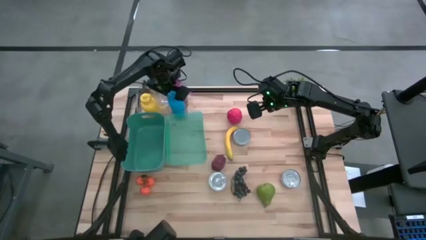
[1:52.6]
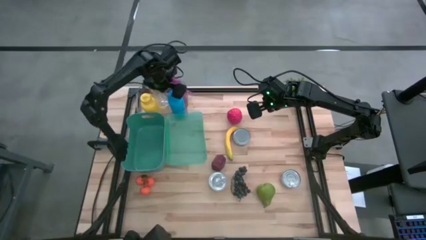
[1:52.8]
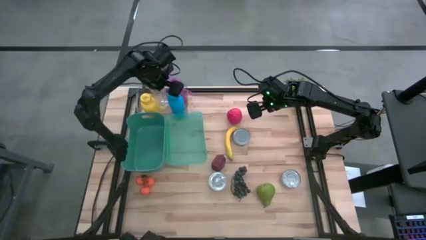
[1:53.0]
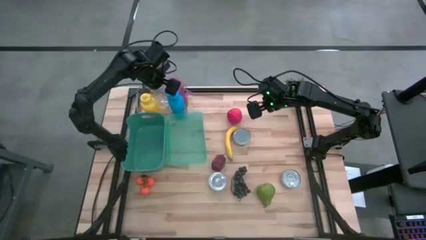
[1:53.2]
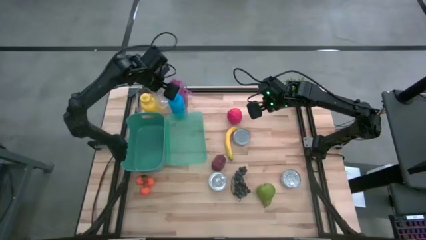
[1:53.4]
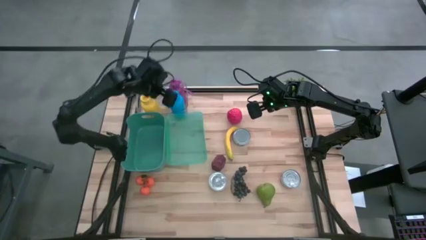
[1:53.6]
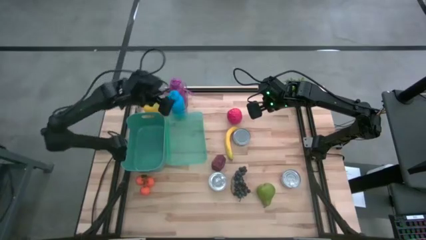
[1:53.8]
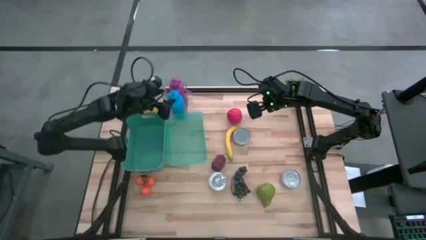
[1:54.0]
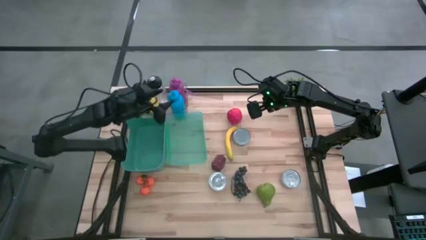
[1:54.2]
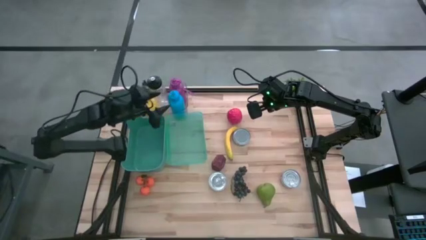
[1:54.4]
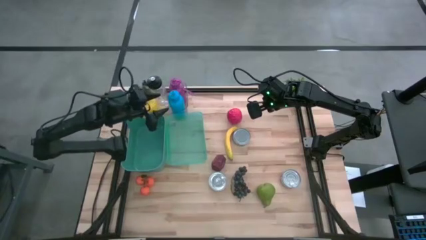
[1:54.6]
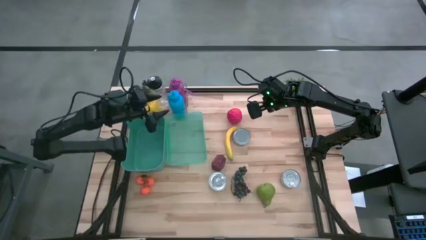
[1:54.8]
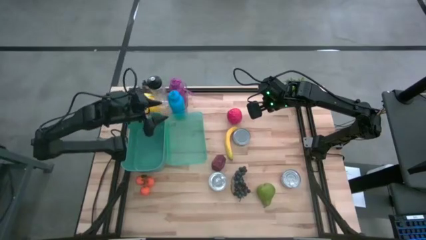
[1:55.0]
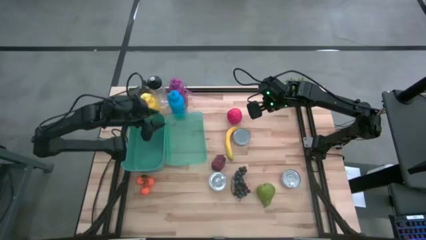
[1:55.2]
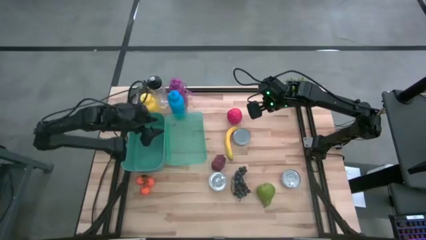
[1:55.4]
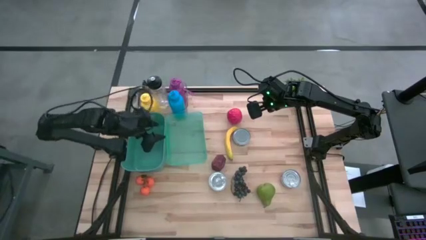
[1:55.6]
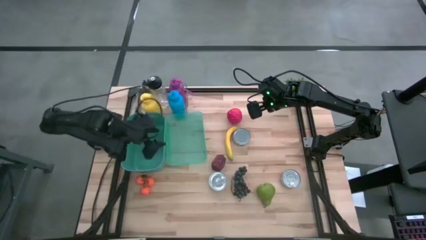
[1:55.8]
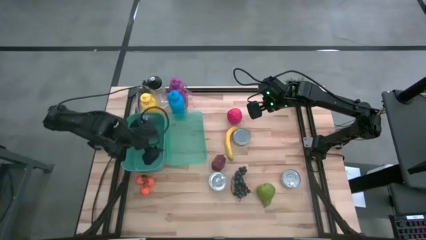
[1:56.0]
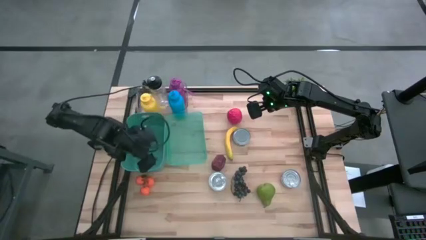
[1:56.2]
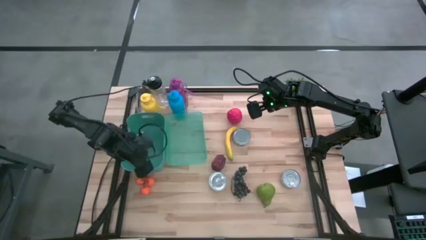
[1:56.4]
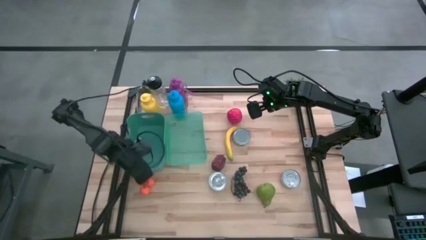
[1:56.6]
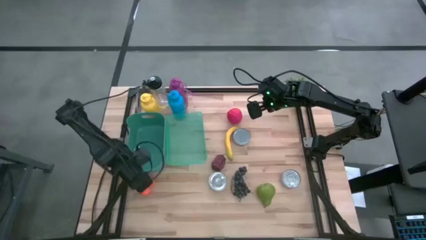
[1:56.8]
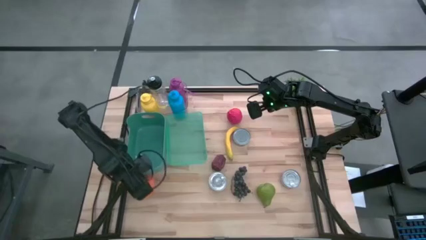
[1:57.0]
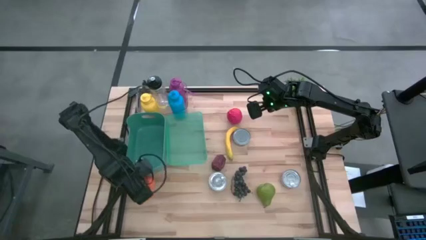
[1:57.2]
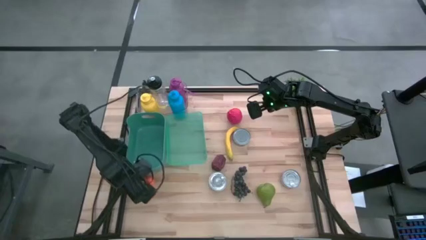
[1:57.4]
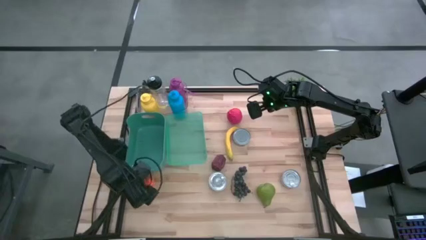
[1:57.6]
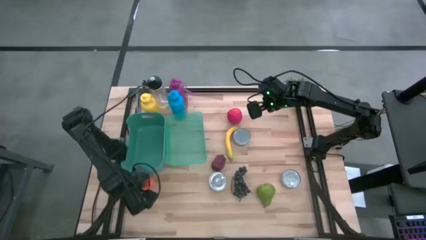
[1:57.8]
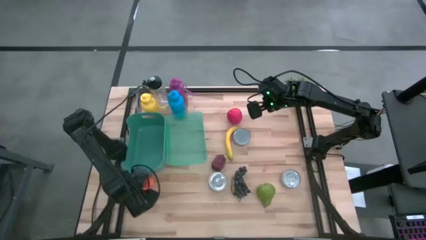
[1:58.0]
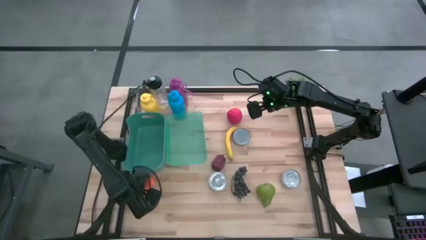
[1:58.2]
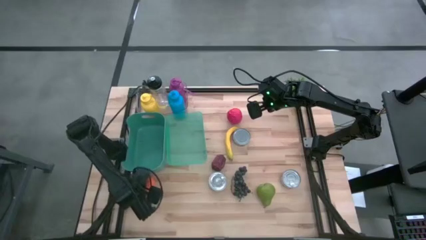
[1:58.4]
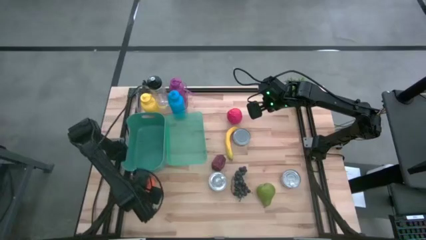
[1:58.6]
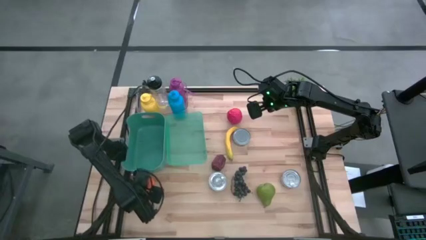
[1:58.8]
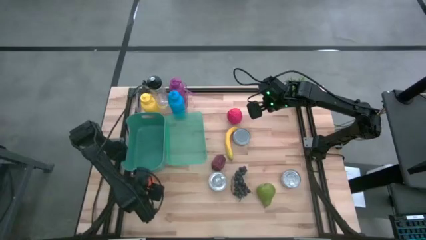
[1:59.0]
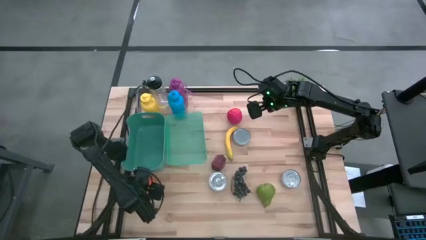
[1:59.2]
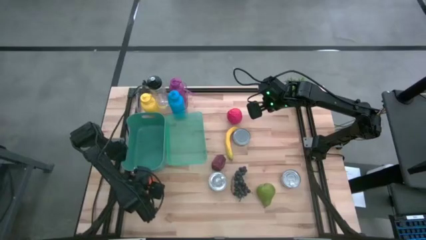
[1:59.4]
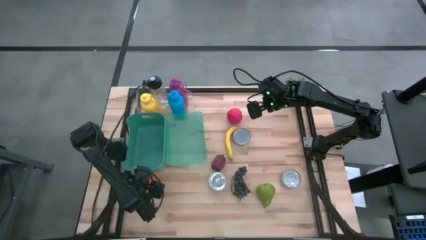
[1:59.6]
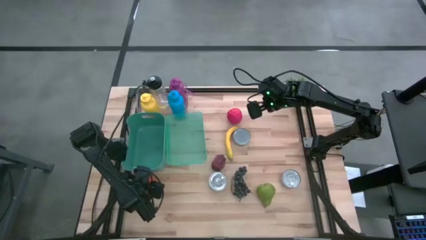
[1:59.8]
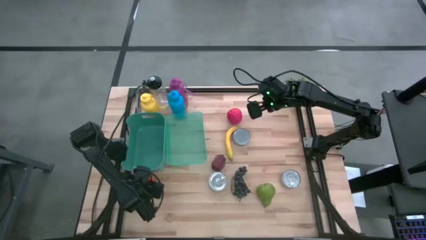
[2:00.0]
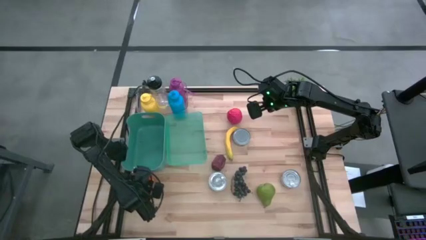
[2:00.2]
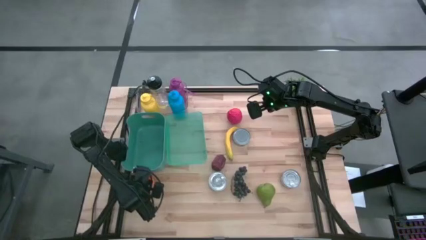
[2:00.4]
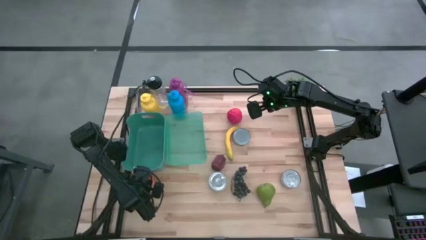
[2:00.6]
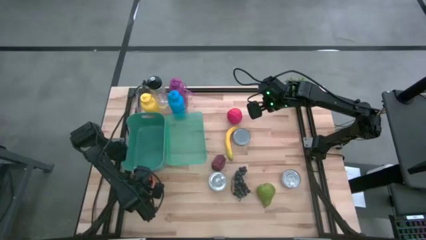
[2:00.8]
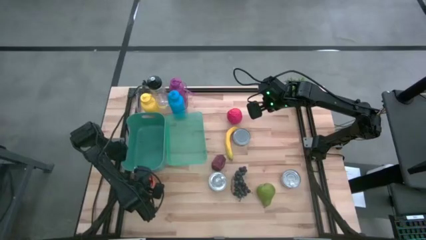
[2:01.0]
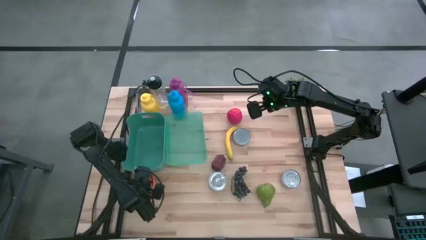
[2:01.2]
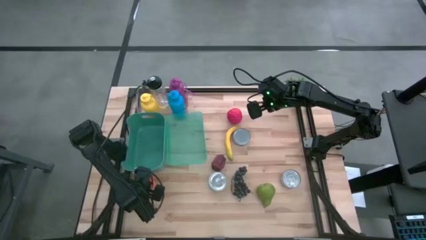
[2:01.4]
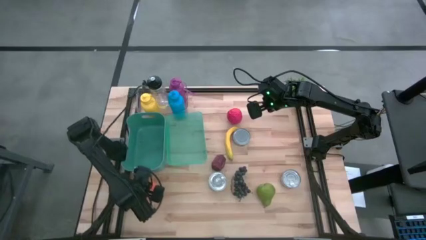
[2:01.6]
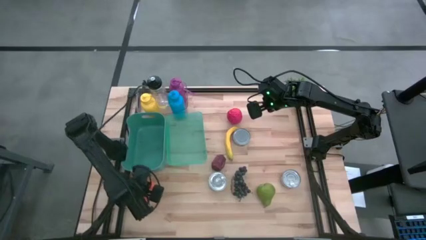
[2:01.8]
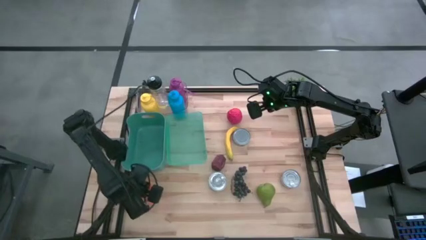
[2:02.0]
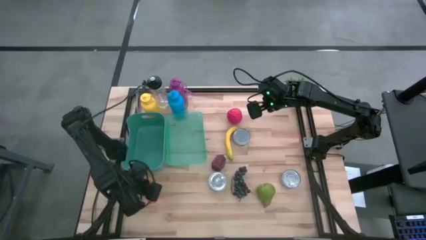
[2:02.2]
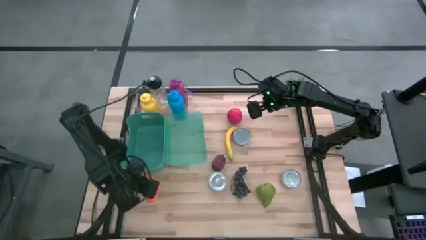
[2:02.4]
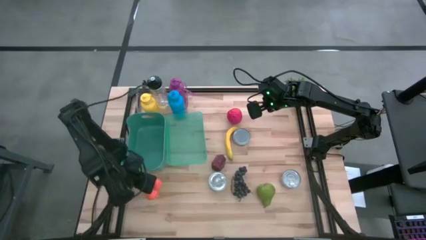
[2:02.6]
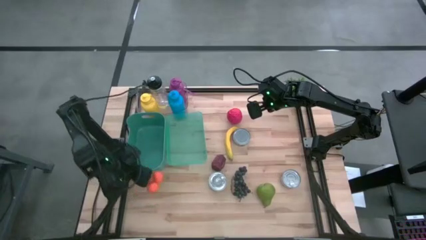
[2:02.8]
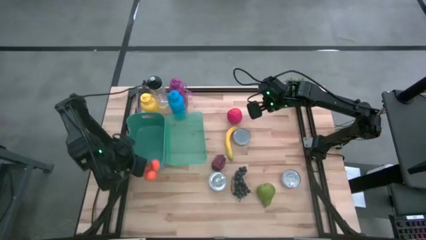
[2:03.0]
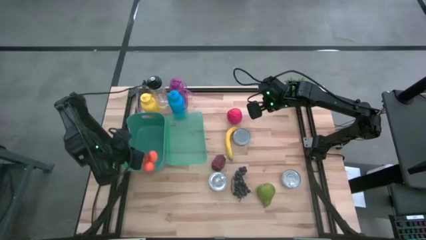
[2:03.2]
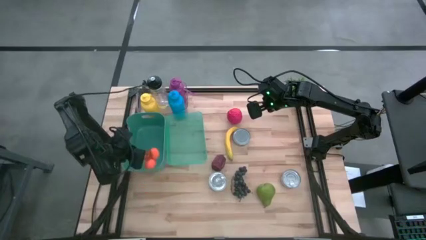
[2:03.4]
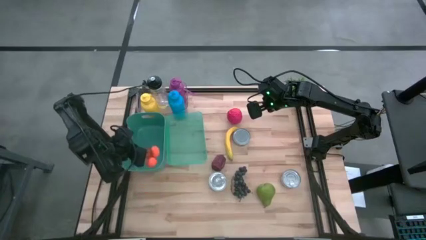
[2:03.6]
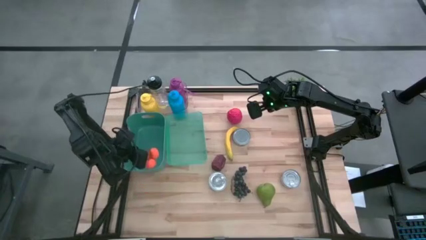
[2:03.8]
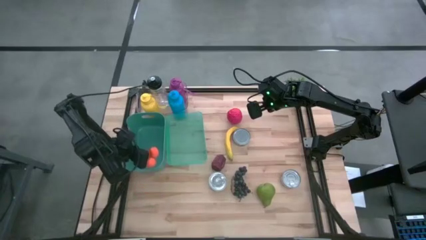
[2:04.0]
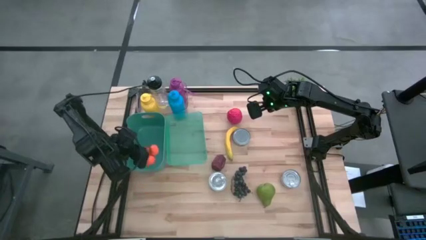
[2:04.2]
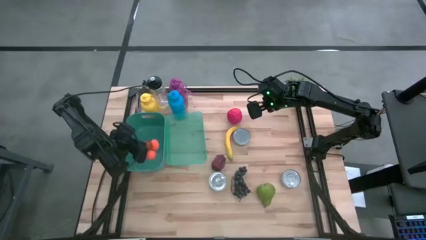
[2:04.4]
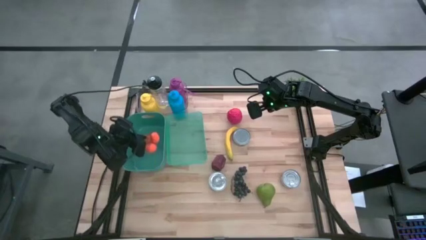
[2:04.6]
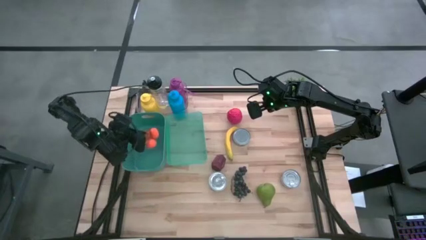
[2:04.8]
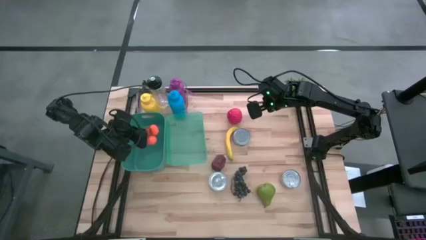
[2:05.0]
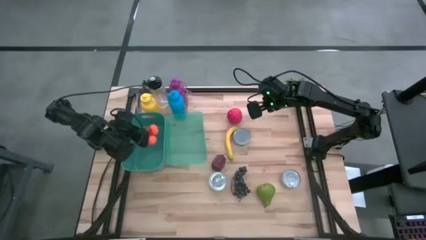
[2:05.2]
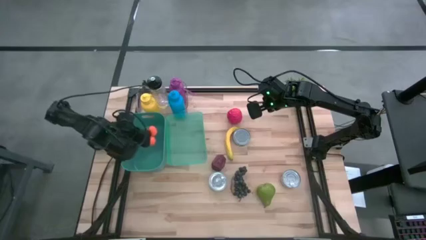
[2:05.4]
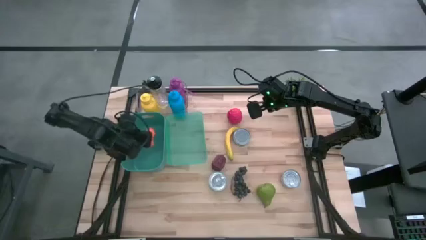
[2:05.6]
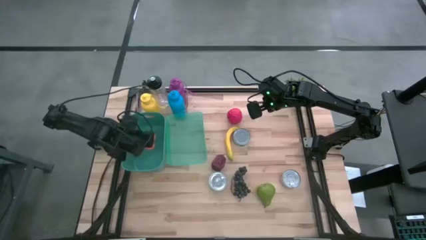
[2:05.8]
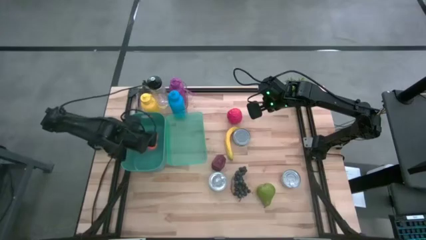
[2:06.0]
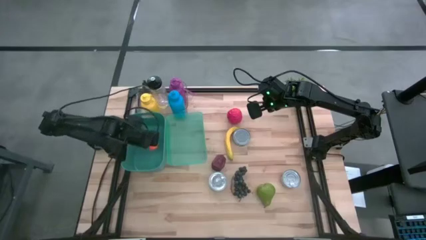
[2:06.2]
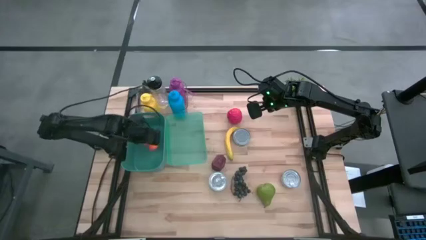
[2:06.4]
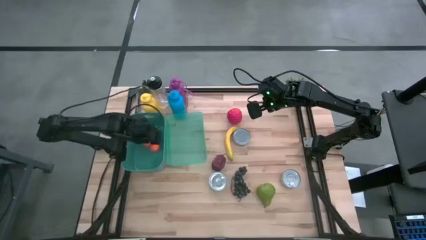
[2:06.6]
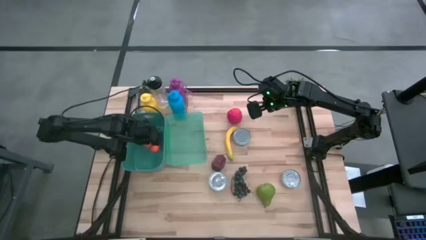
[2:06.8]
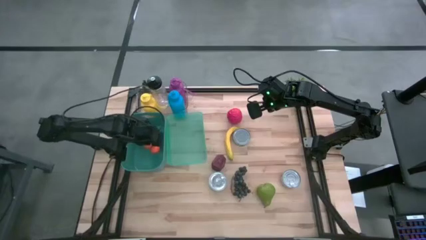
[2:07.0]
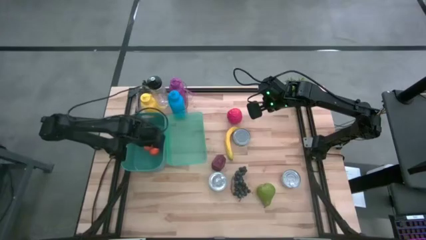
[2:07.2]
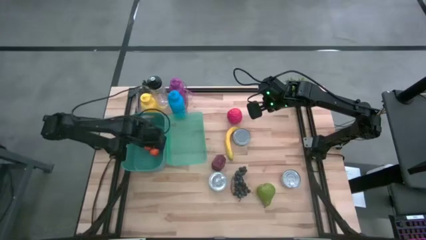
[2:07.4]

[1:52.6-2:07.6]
Task: Pick & Place Food Item
Put the tangerine into the green bin
